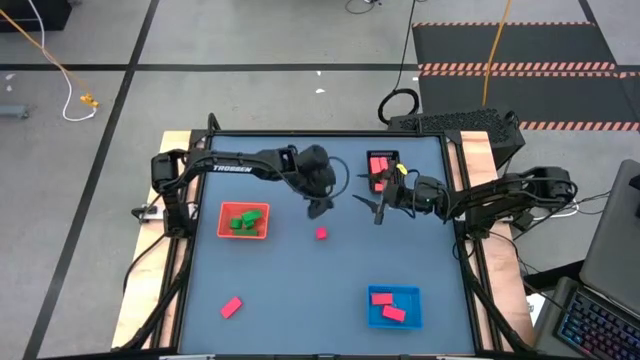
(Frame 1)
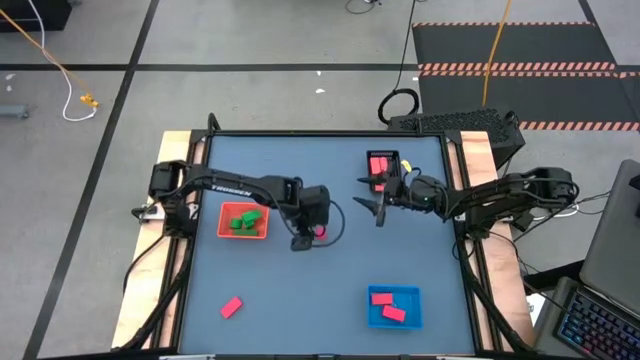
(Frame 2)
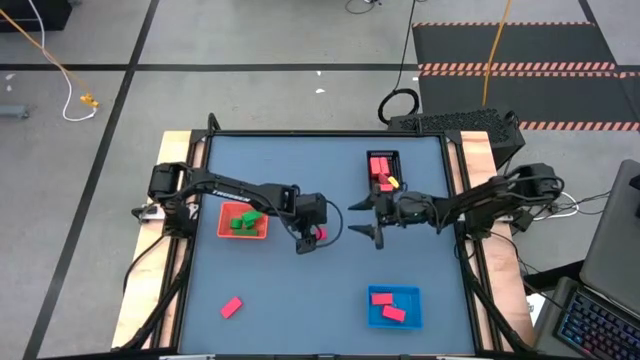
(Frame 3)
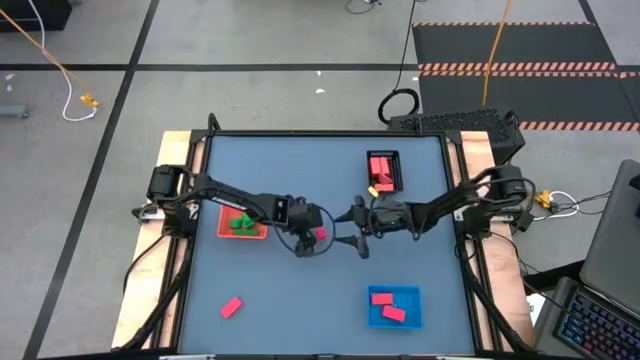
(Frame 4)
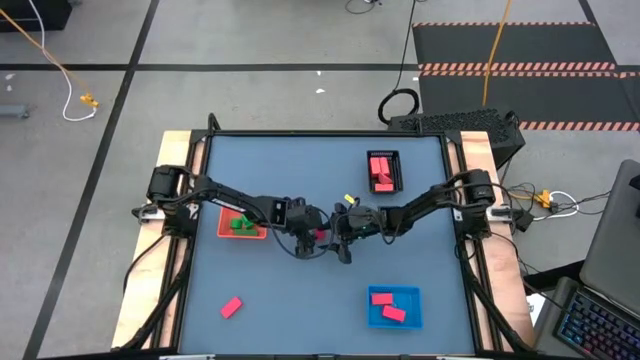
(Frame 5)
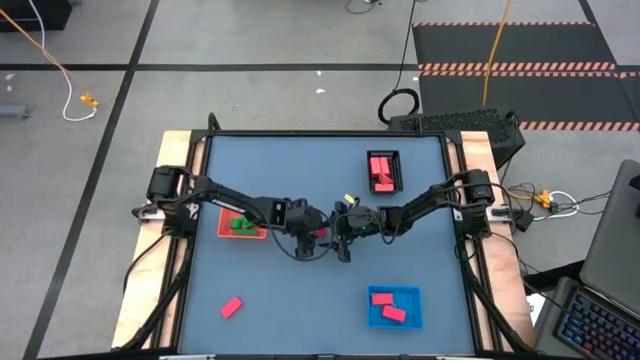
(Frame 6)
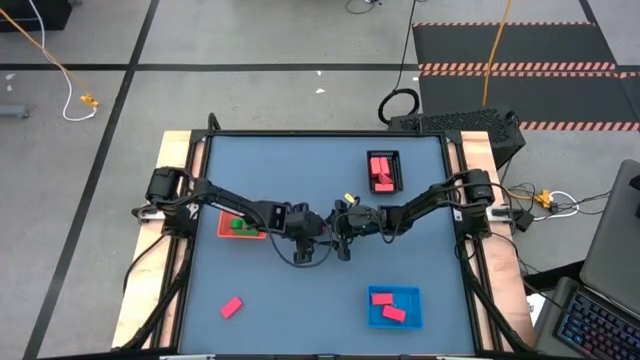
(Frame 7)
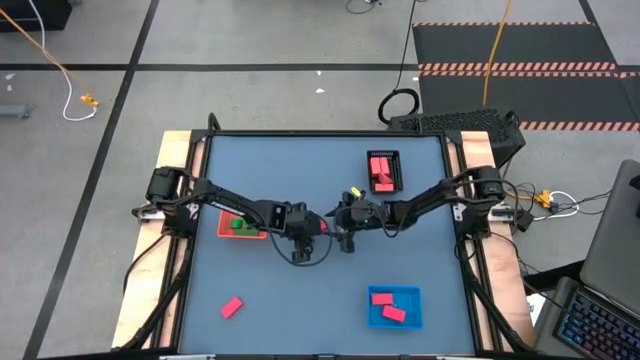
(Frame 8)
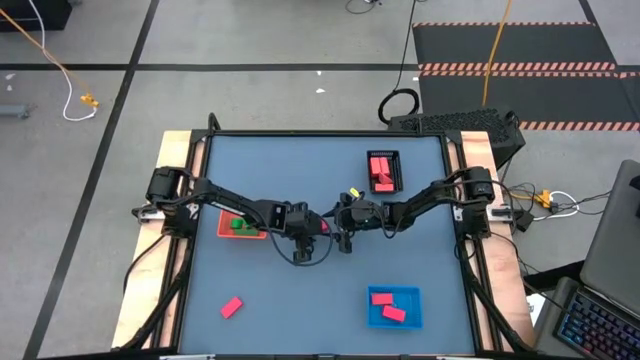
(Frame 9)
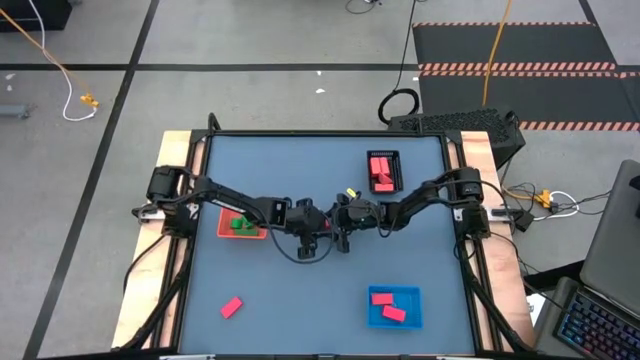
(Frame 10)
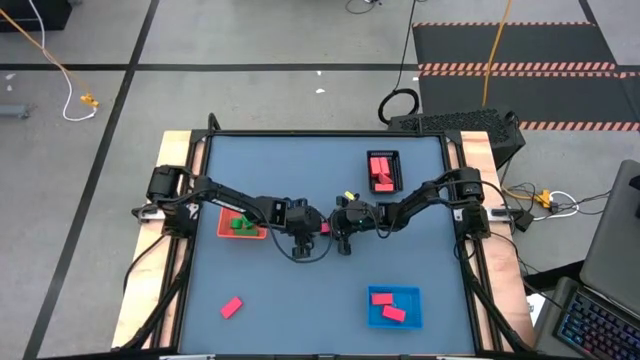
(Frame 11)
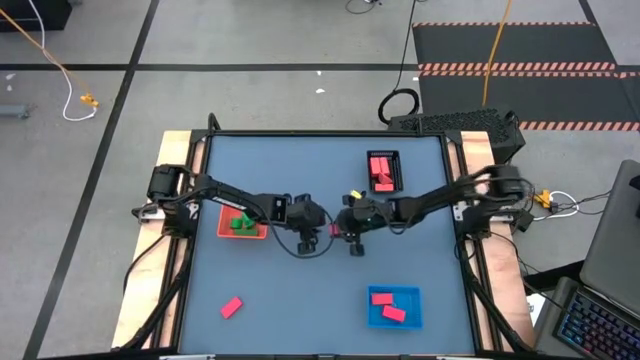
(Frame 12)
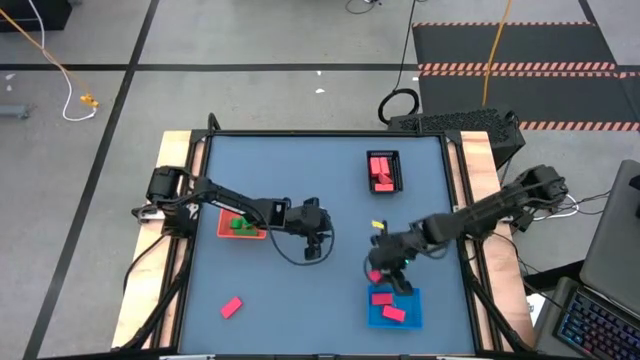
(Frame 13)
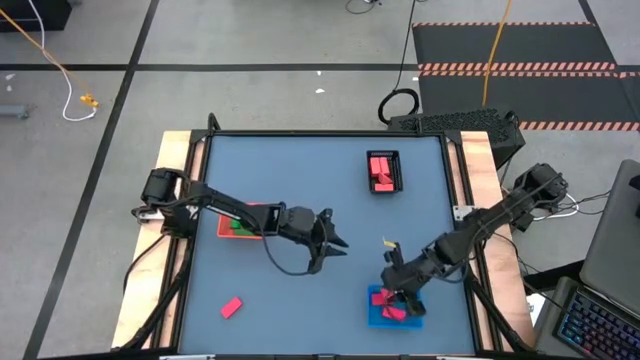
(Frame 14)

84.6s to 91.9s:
Task: Sort & place blocks by color
Put the red block into the blue bin

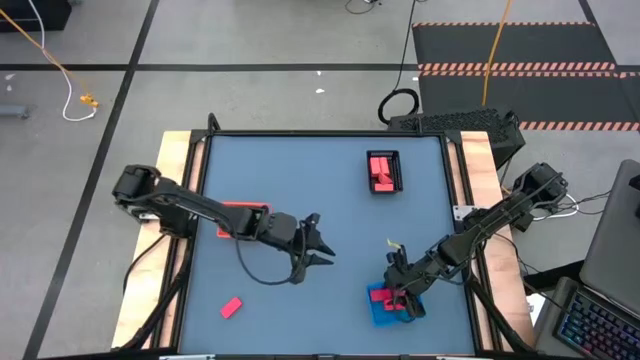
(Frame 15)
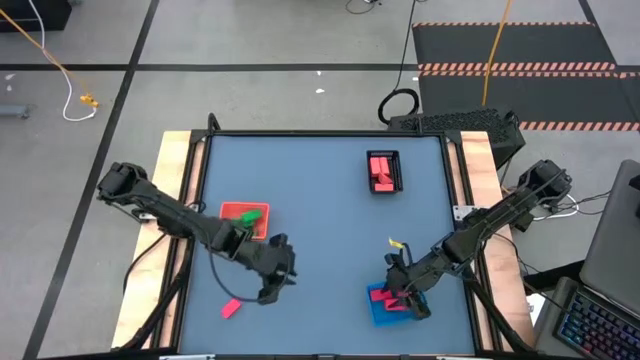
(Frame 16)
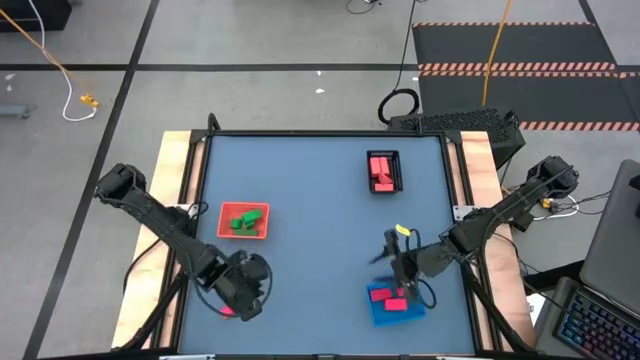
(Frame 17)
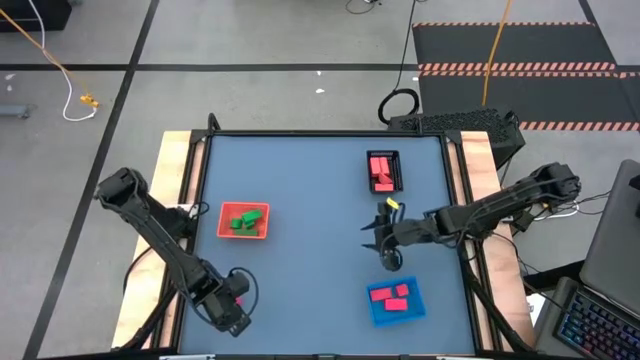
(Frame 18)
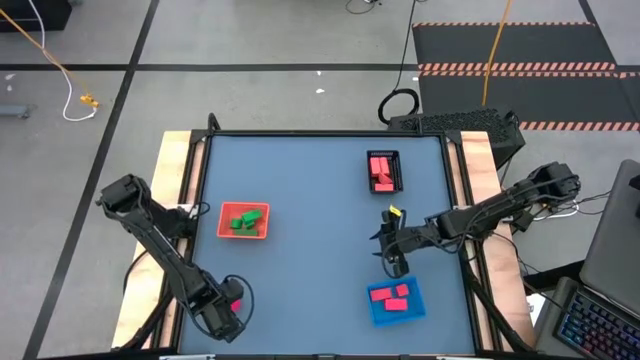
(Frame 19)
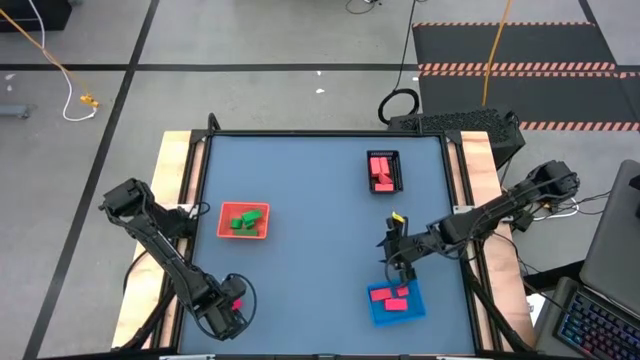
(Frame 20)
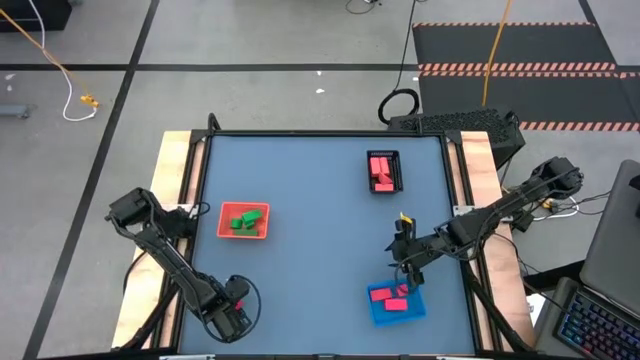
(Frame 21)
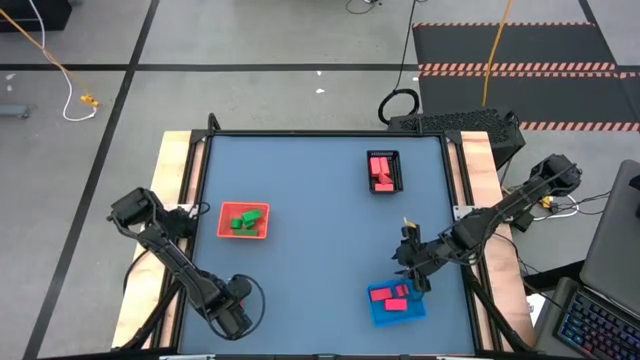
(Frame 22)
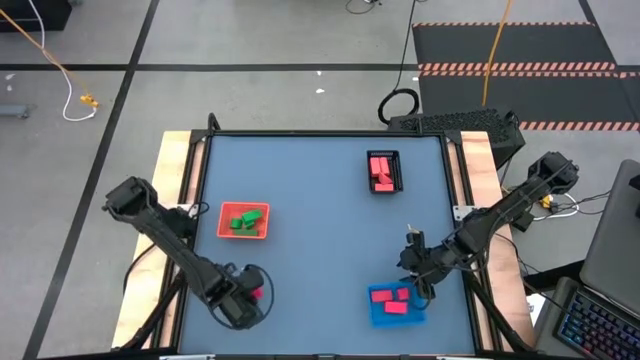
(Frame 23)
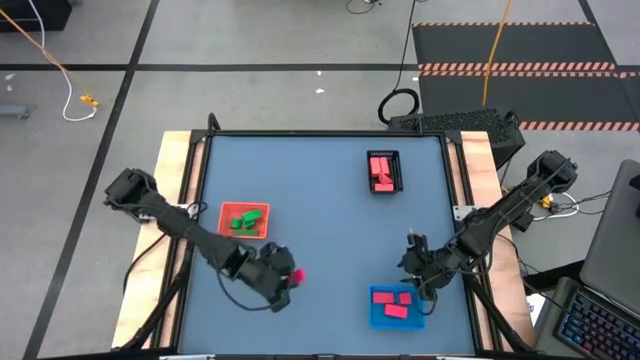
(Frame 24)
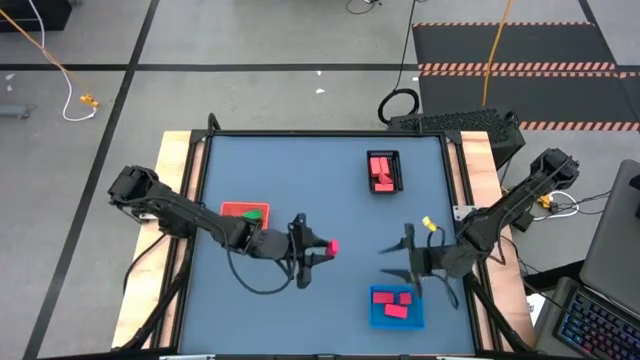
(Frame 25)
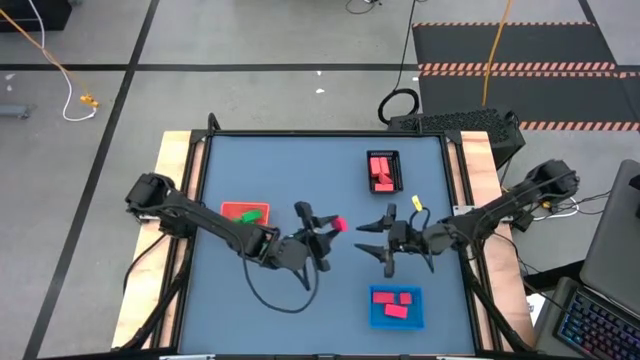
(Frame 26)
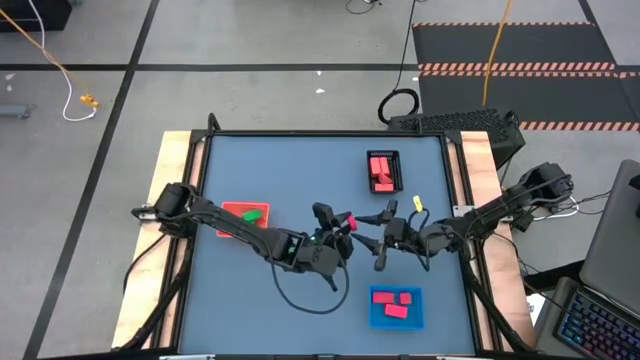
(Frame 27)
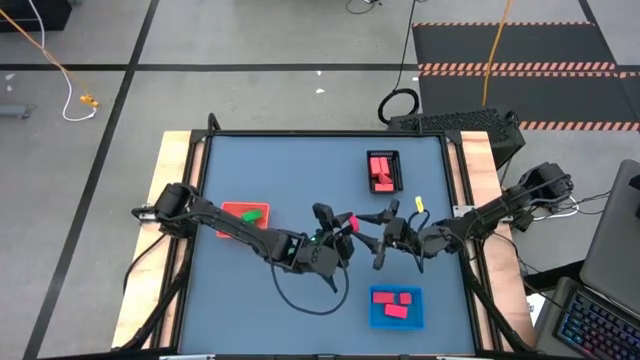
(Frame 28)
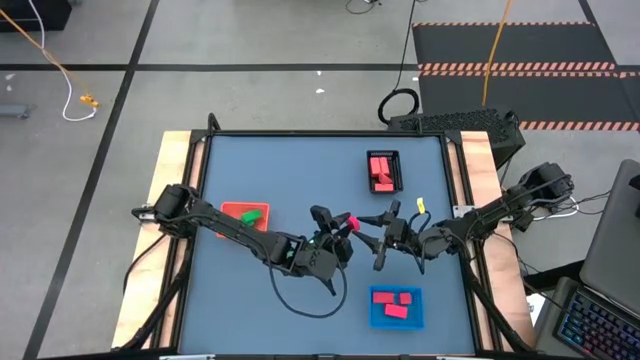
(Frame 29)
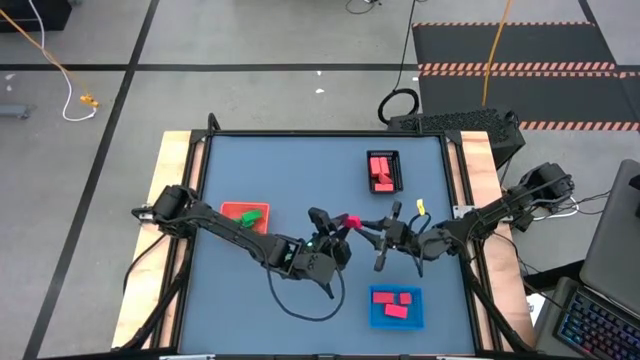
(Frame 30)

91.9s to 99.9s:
Put the red block into the blue bin

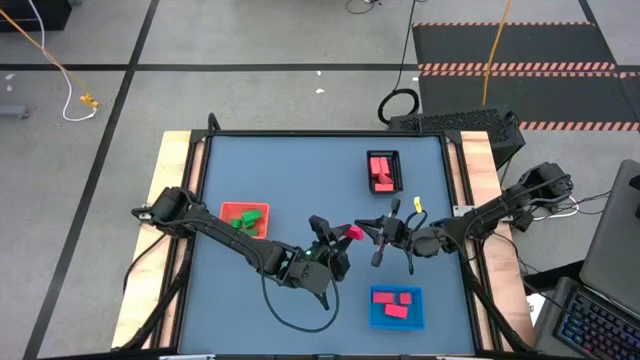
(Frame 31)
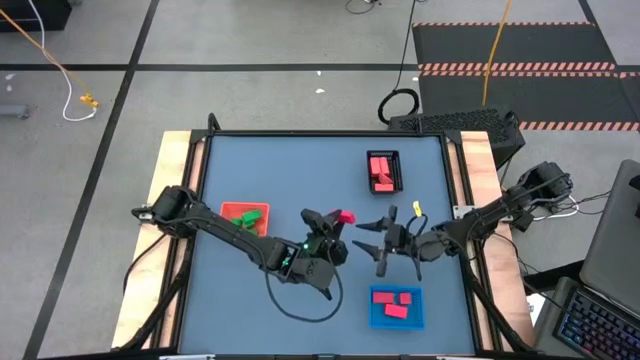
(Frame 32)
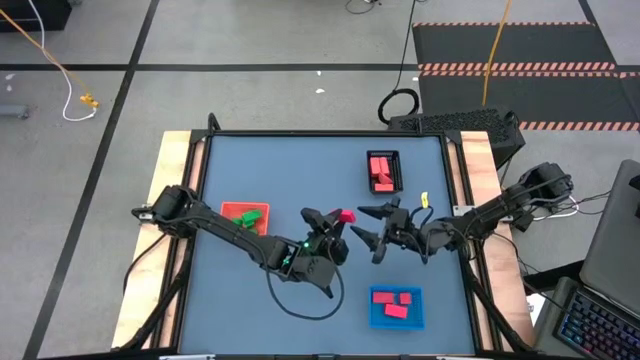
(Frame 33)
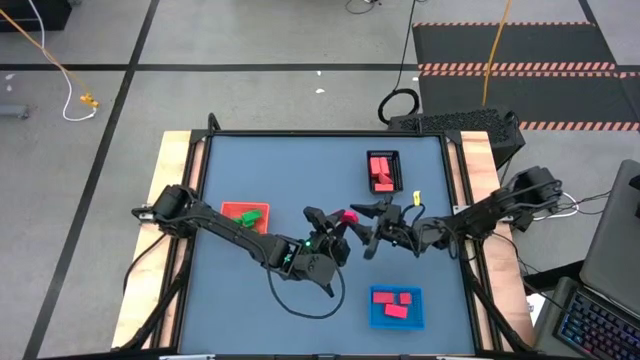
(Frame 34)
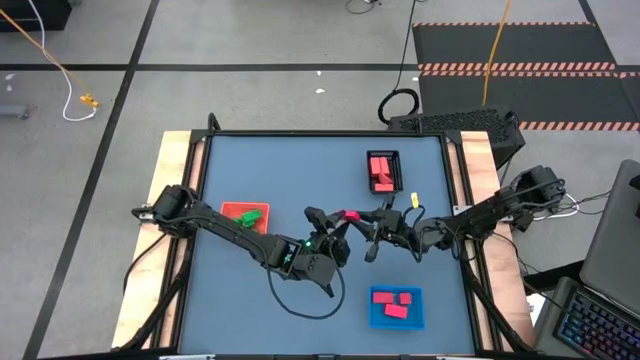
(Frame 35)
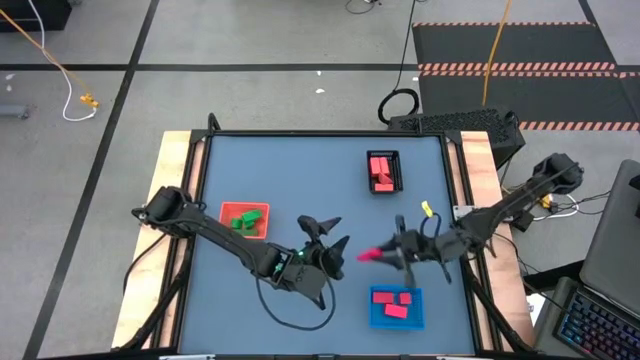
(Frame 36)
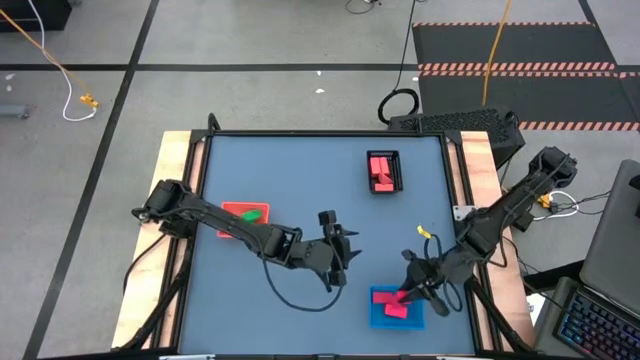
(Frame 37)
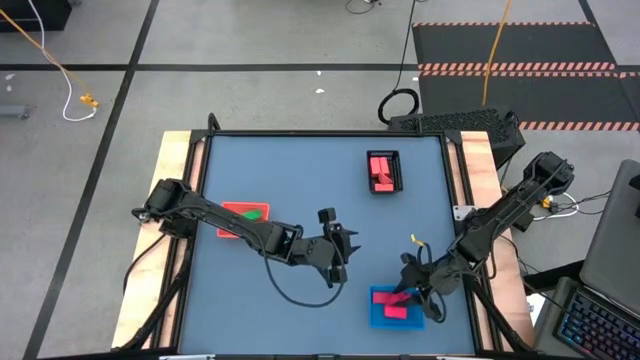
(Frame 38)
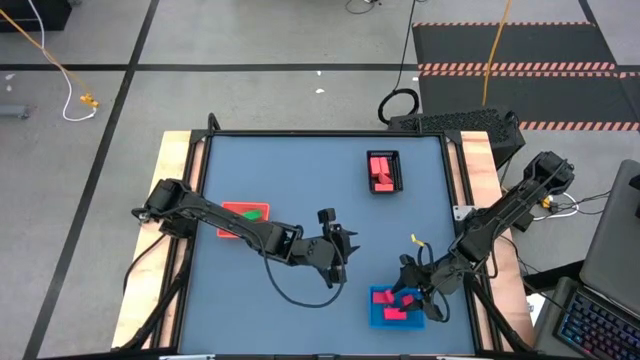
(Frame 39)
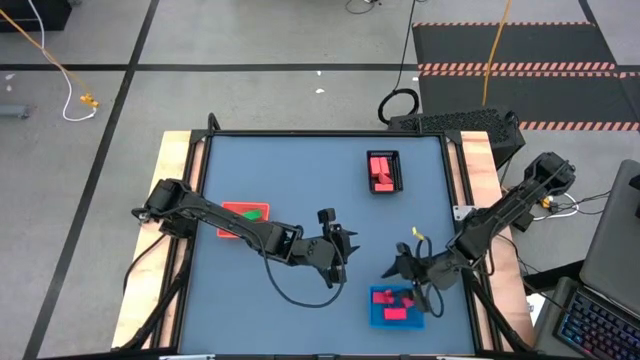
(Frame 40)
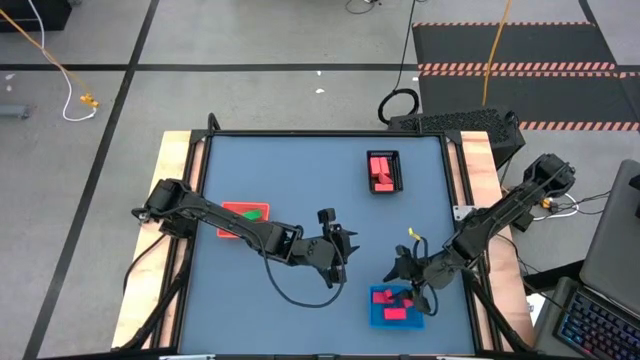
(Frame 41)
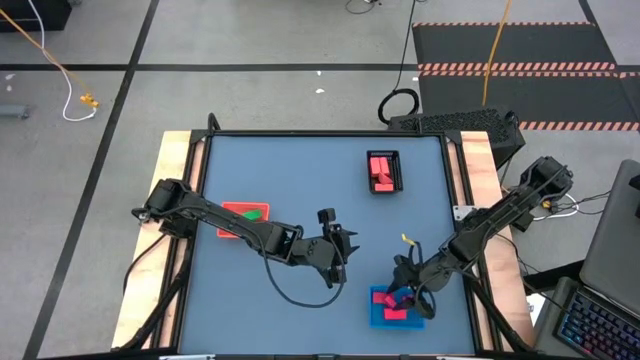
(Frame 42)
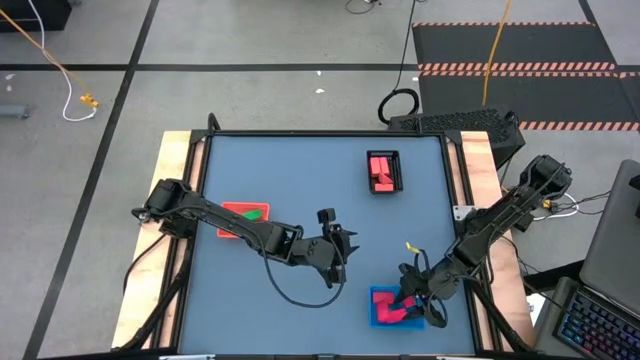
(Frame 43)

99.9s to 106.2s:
Put the red block into the blue bin
